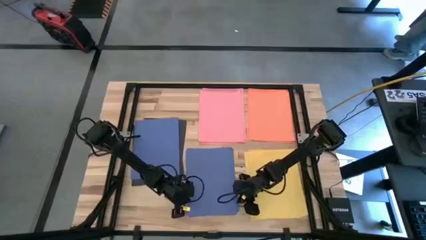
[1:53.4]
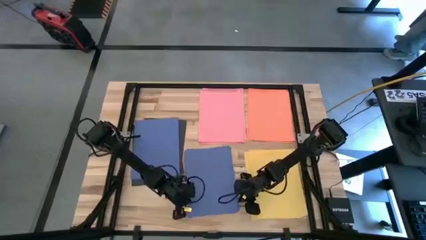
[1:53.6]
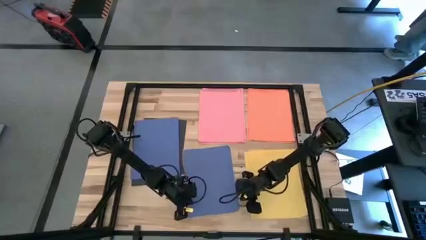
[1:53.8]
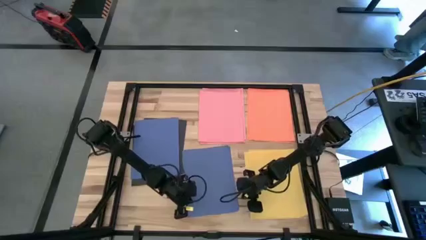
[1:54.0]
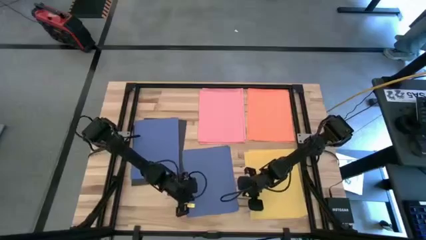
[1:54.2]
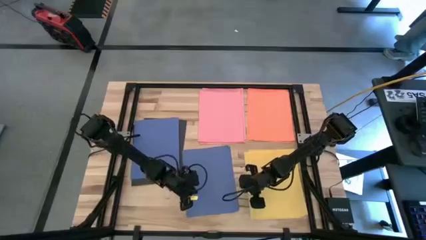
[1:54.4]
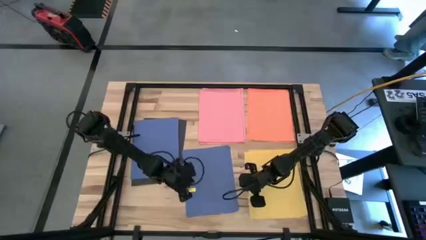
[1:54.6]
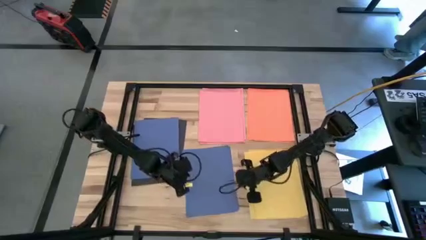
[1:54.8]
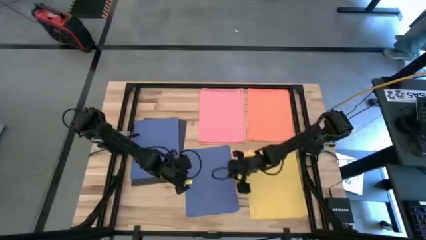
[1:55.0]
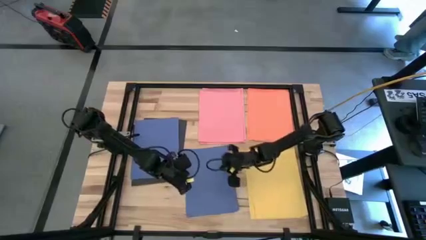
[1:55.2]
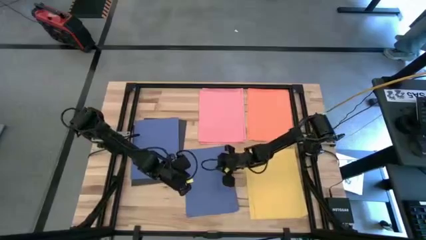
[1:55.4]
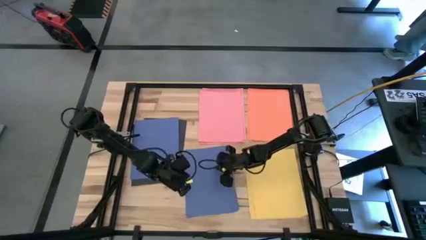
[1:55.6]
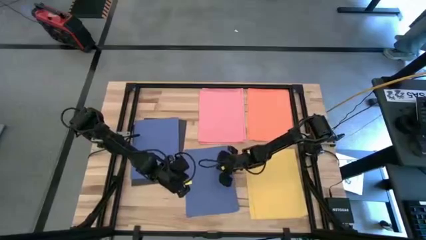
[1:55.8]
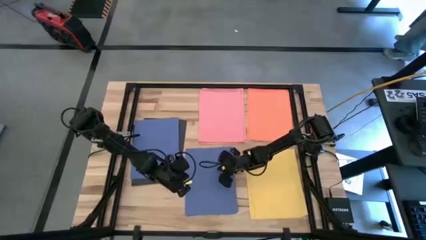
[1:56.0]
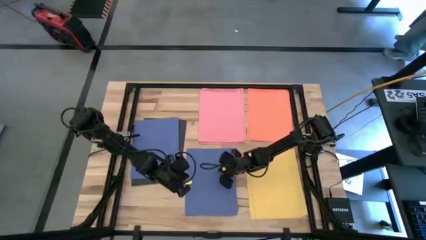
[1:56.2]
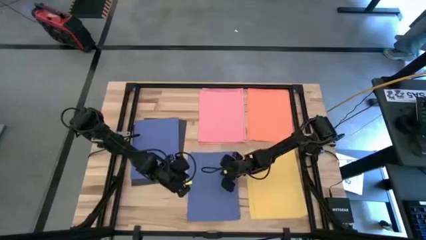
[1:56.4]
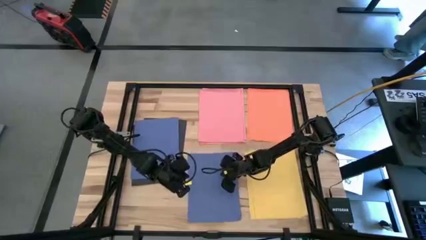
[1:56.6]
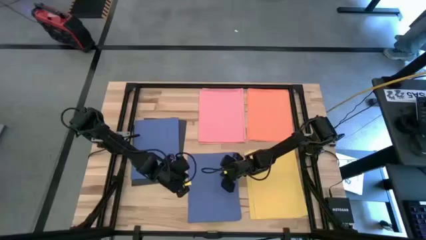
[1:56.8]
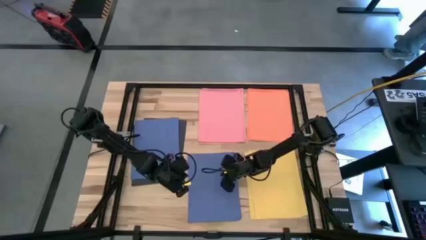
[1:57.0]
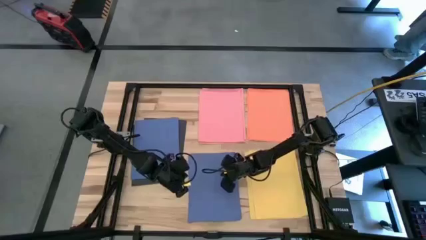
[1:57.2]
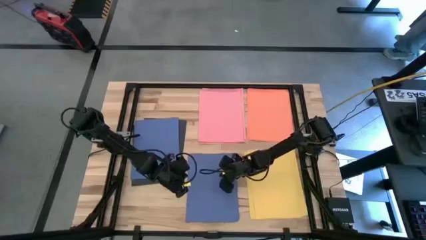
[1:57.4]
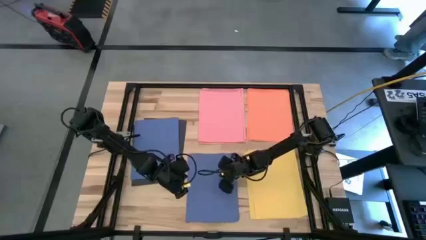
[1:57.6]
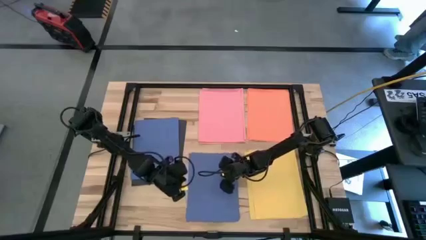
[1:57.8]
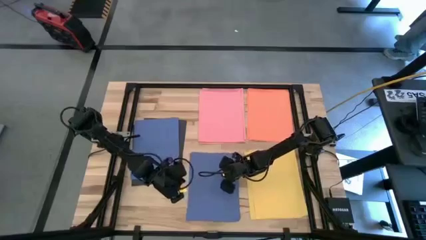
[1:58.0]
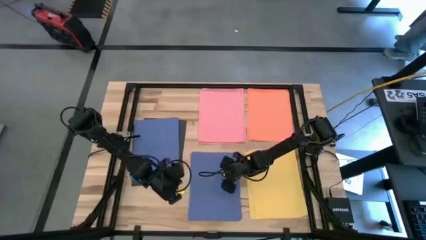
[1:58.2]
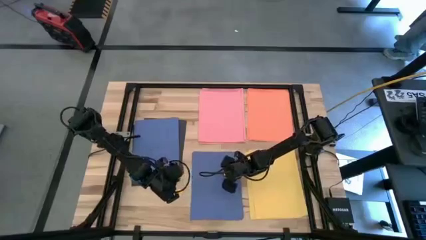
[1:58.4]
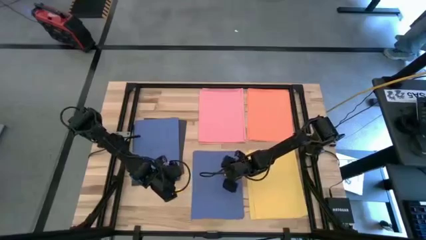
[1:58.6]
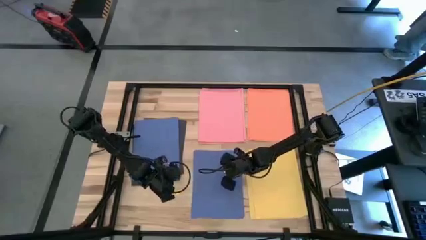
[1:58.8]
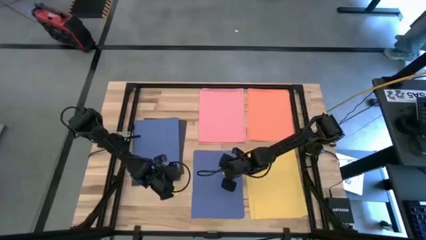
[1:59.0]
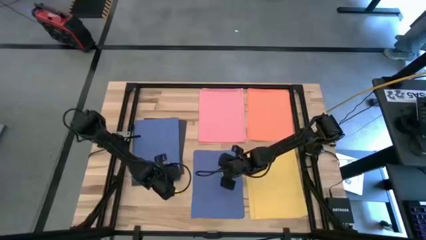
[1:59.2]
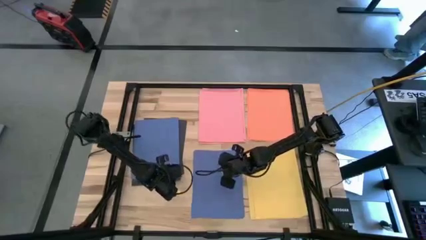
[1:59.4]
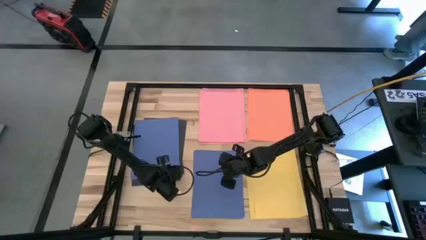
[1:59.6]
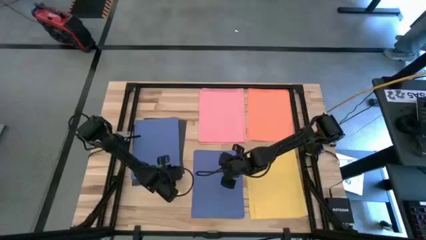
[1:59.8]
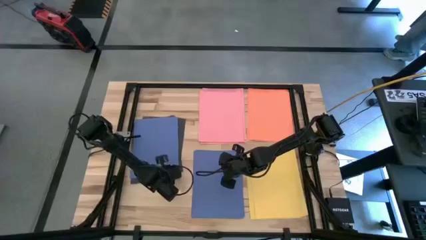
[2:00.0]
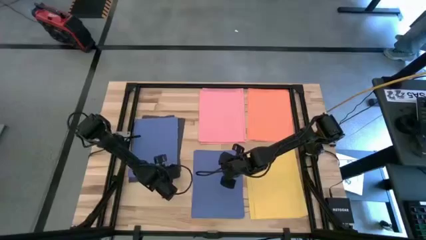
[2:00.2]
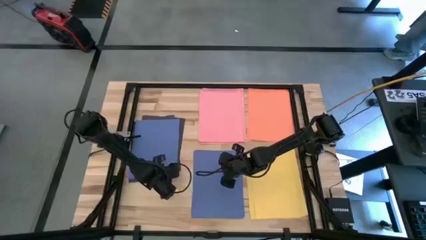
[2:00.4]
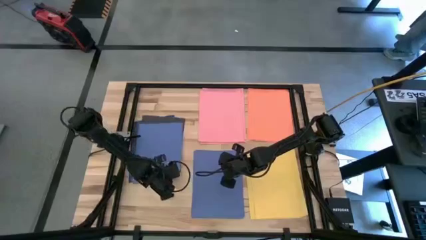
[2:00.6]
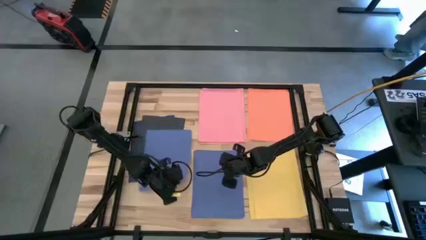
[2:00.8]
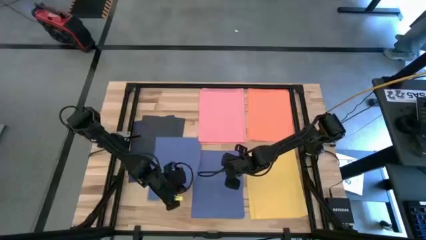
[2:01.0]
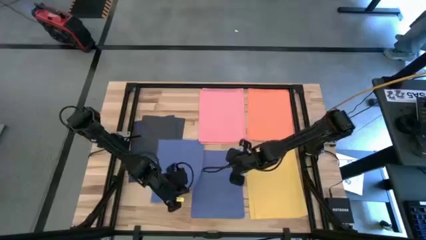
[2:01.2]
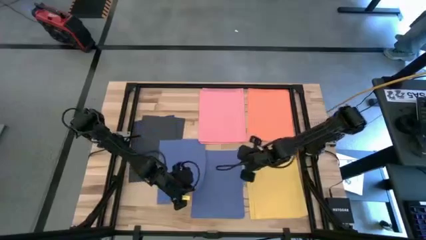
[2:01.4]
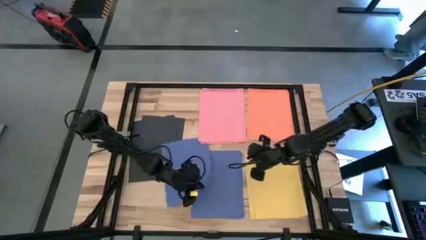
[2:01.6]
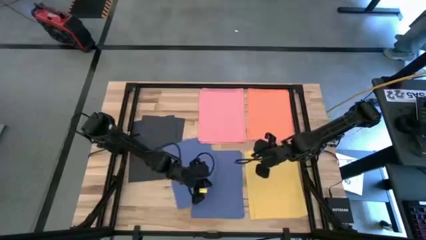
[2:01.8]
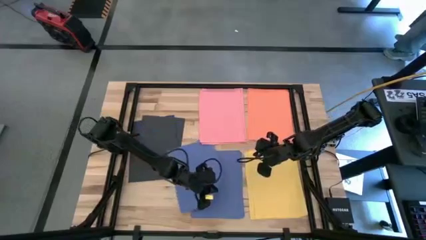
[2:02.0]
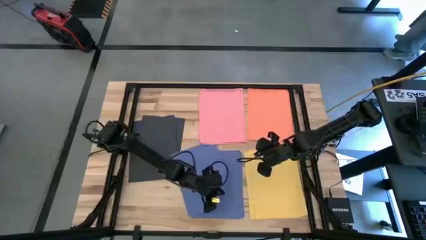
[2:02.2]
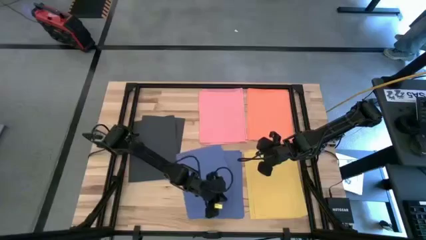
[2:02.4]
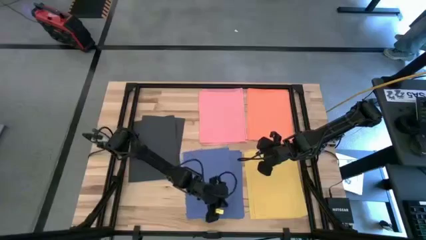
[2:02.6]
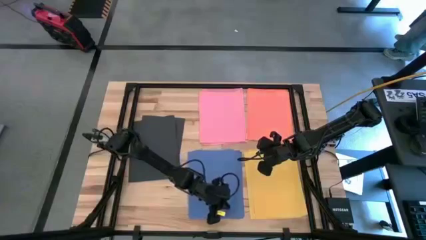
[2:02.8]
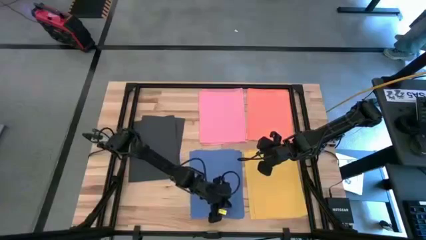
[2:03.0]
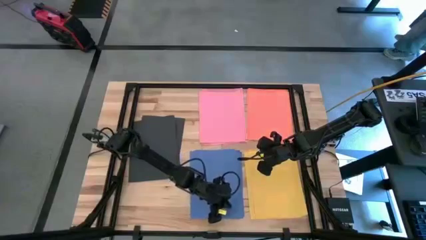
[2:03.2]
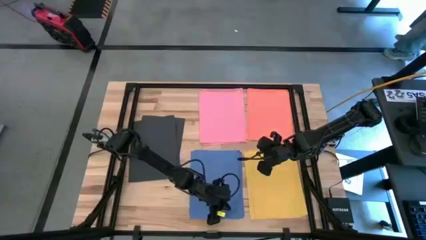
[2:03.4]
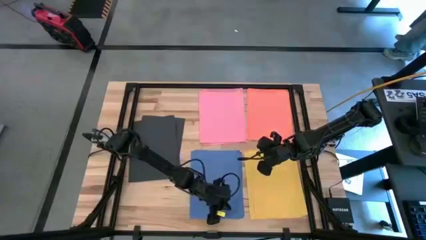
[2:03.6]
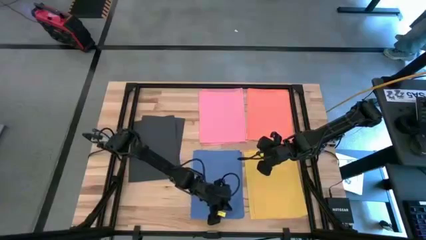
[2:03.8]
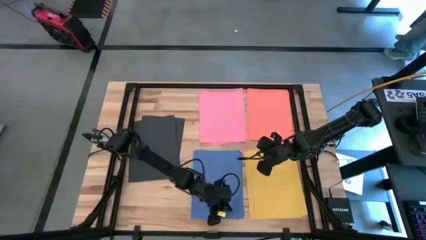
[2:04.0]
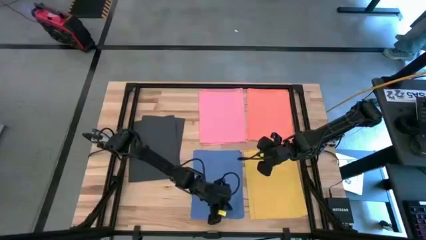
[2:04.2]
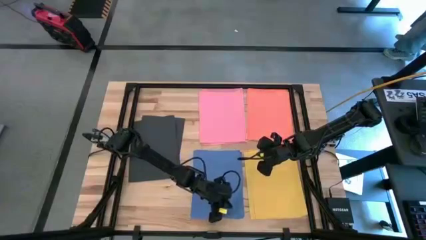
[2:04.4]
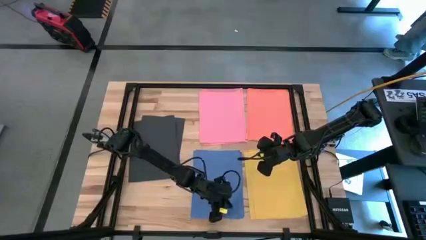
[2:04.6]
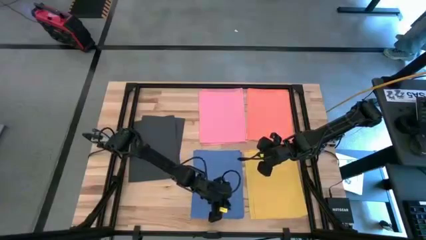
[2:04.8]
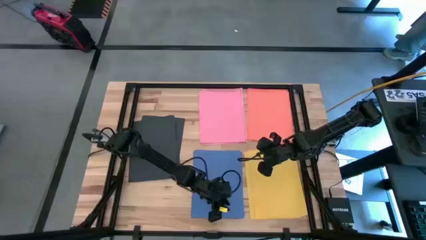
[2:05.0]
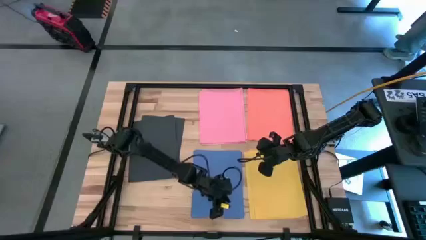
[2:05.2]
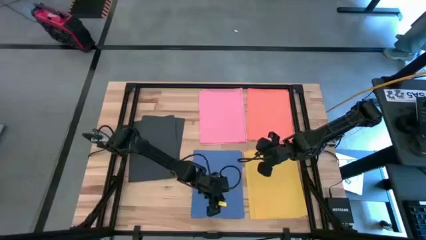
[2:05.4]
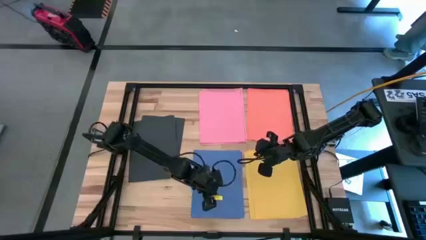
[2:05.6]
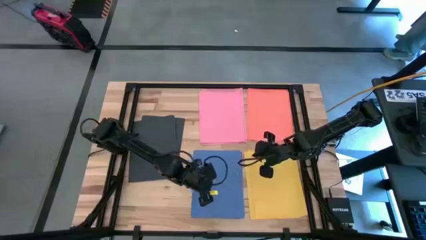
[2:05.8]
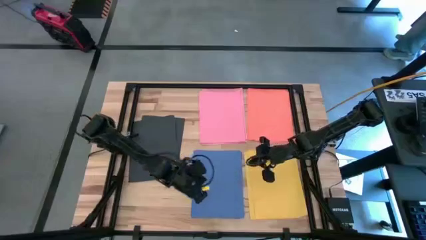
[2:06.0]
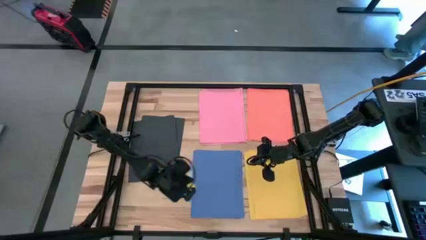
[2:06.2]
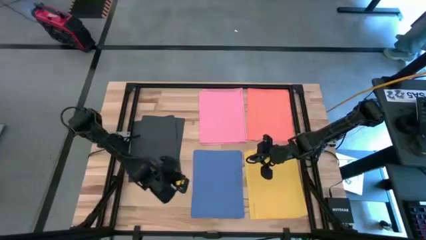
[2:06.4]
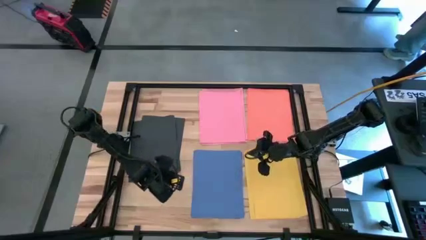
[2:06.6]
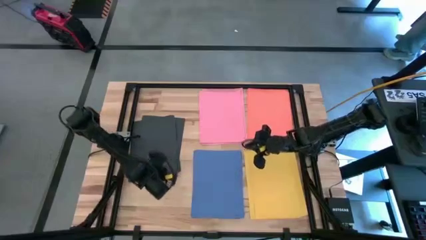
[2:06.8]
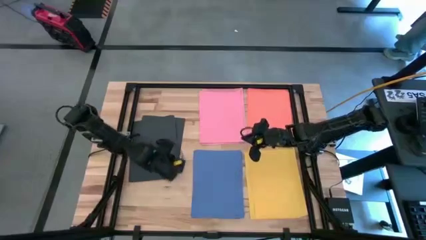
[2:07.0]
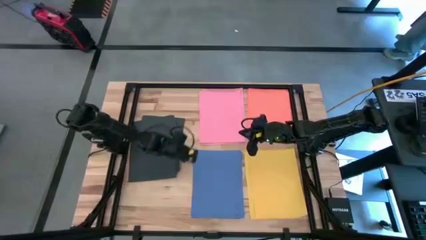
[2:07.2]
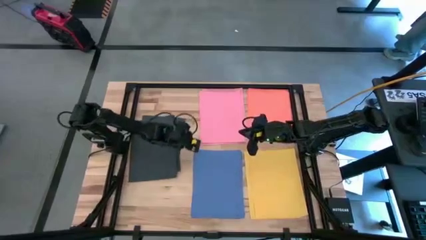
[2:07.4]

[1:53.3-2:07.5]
Task: Organize paper
Put all of the blue paper at the lower center of the table

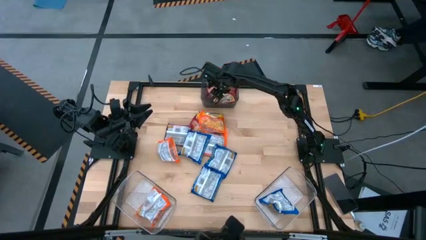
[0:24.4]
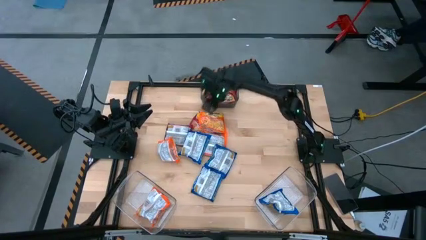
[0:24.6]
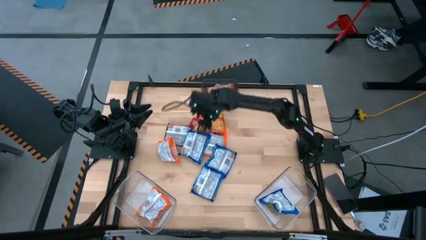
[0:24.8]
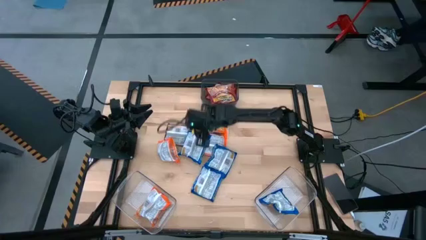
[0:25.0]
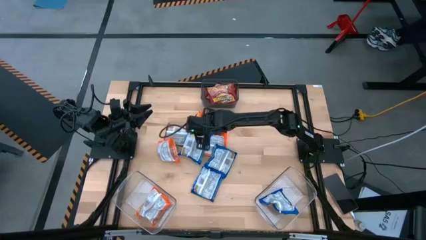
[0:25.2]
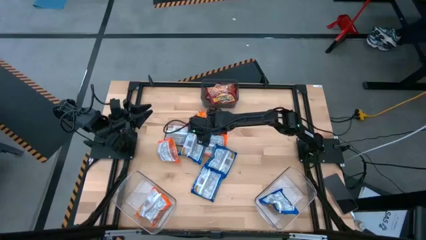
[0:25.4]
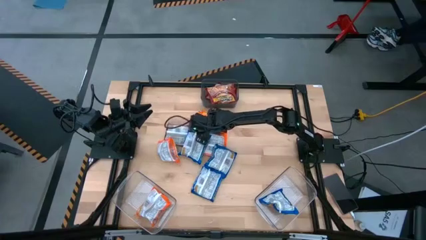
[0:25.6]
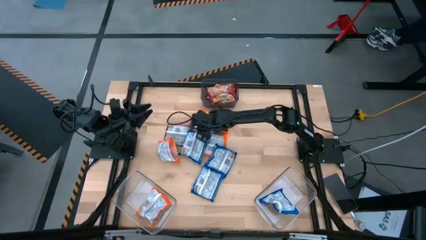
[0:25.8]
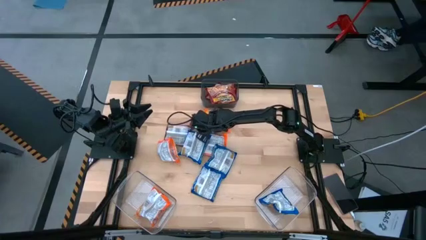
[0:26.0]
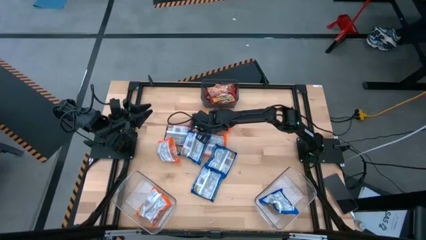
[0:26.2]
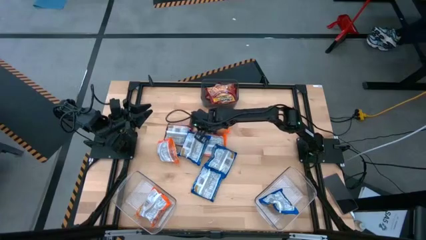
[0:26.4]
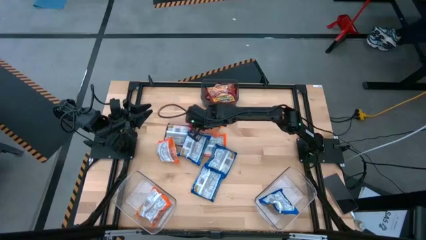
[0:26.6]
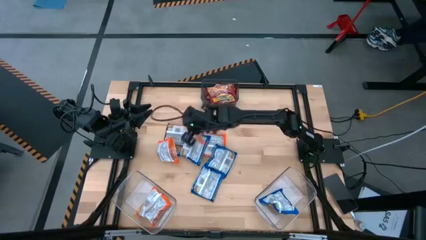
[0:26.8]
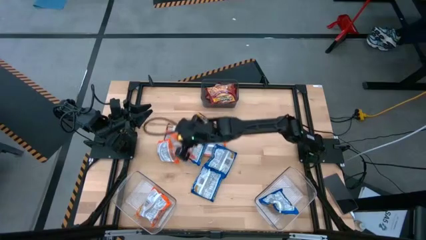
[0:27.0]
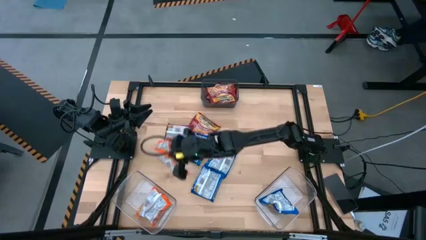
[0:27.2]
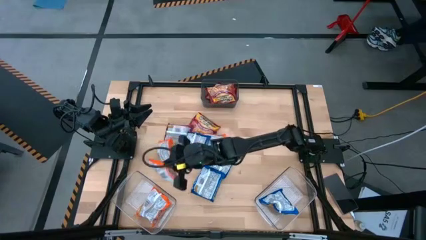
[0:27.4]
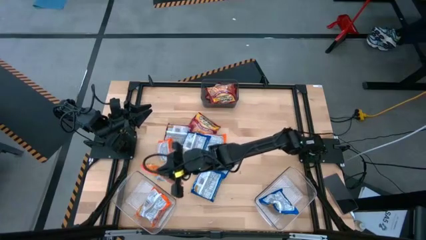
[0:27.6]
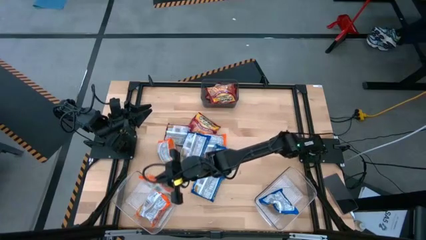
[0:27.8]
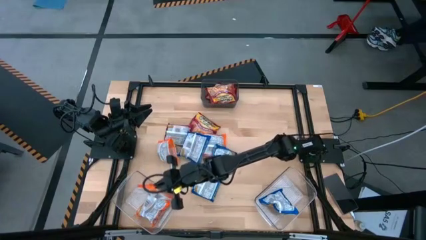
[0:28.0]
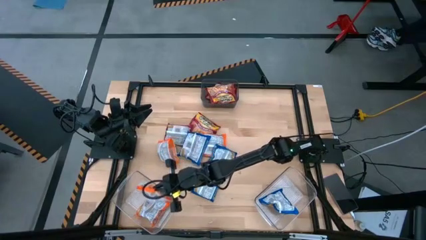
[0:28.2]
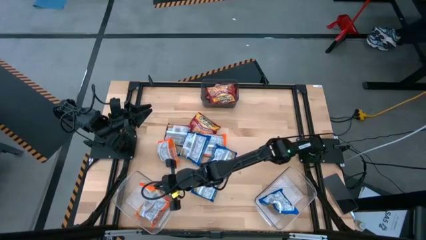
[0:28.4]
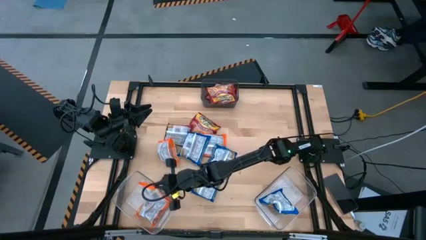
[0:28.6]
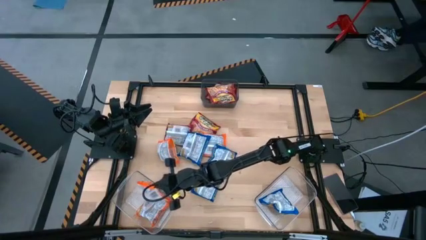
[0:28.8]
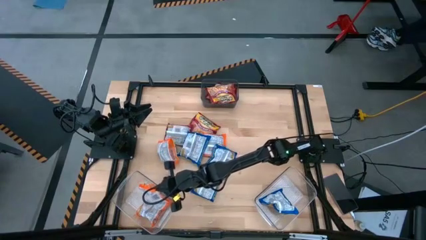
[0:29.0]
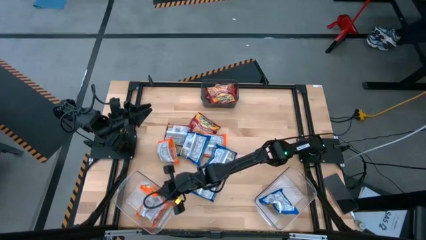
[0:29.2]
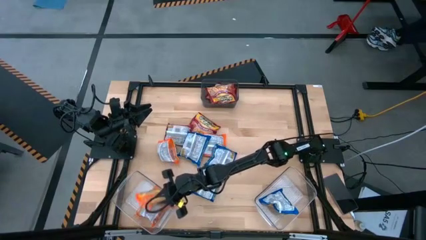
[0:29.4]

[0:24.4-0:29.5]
Task: Sort Maruchan noodles
Put the orange noodle pack into the left transparent bin
